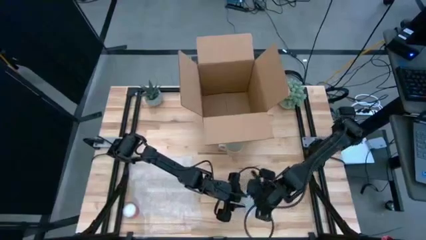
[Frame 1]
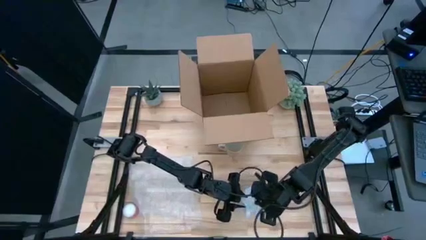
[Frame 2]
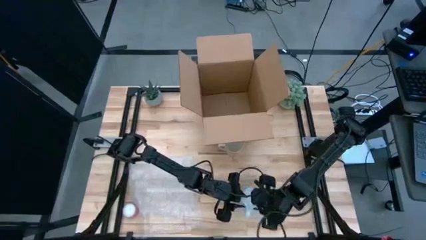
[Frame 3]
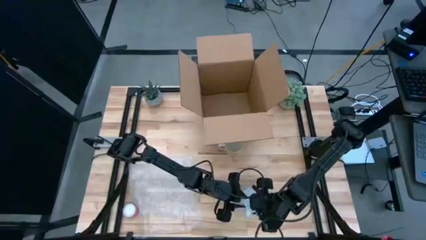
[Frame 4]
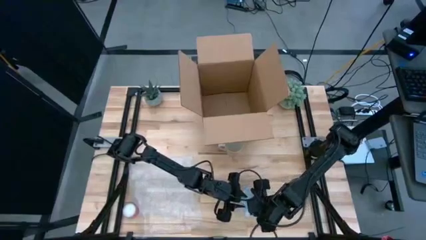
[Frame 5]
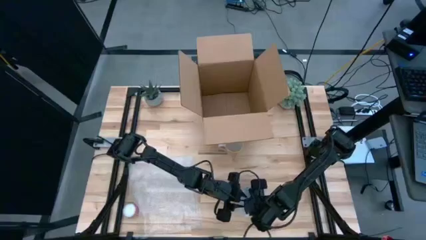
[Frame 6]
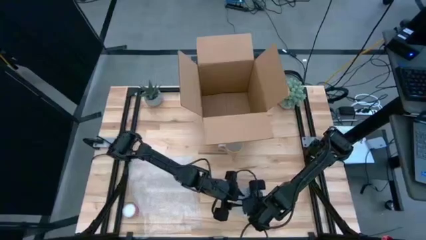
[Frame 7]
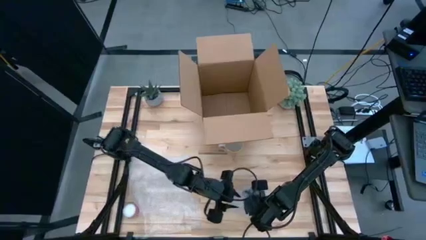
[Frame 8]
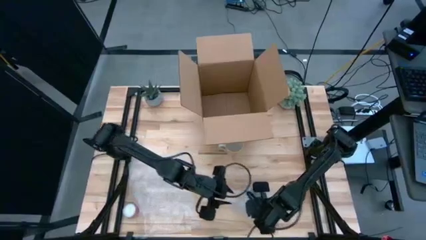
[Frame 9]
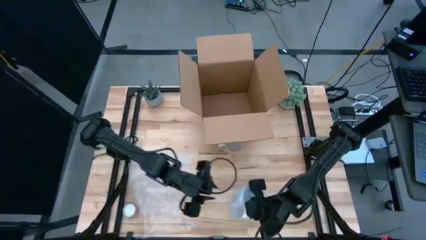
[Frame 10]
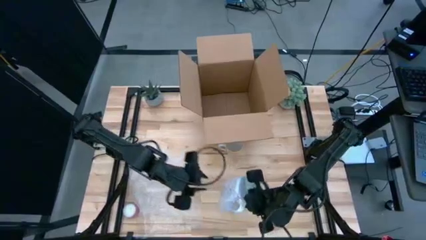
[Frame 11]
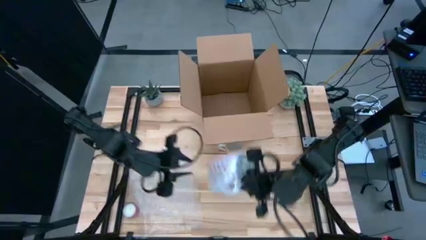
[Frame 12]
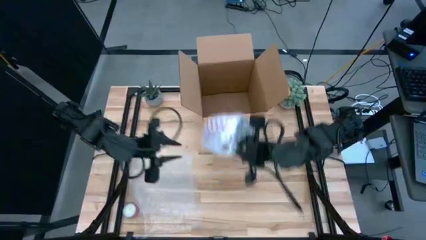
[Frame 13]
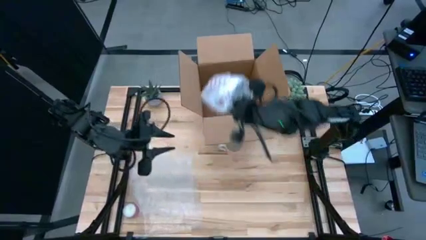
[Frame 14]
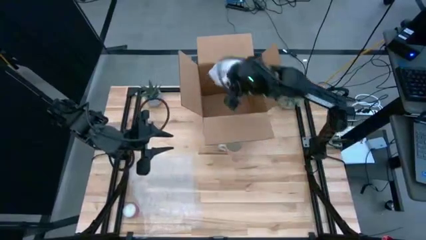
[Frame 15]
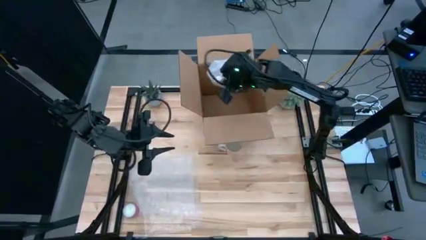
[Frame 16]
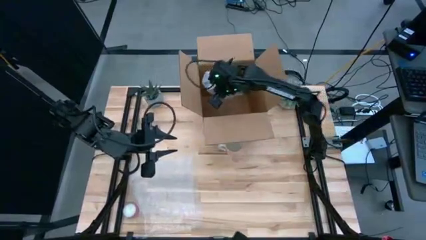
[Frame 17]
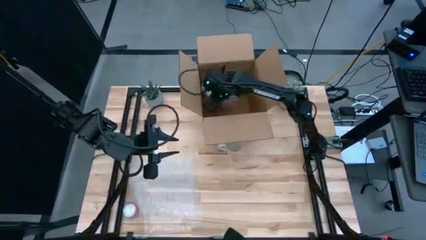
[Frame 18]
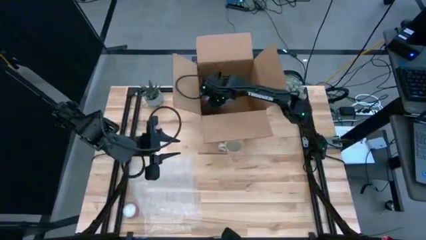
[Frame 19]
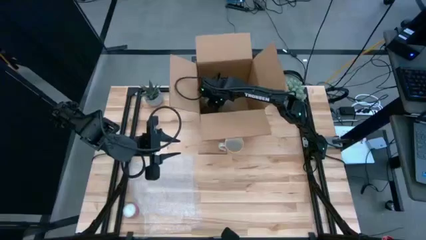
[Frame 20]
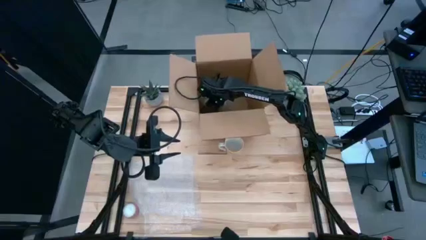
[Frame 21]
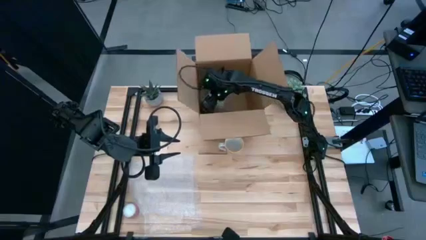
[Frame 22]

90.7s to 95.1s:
Task: wrap mug
Put the wrapped red mug into the cardboard box

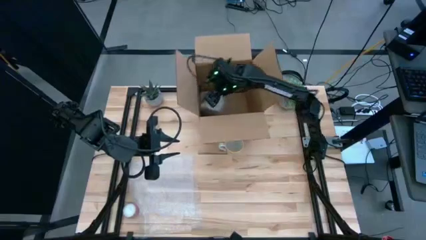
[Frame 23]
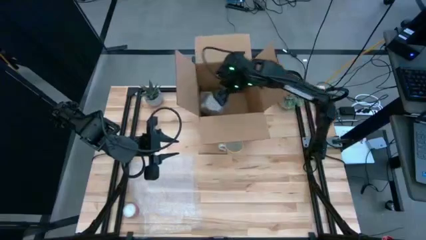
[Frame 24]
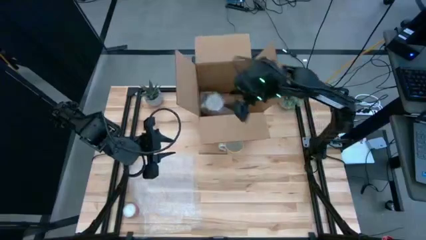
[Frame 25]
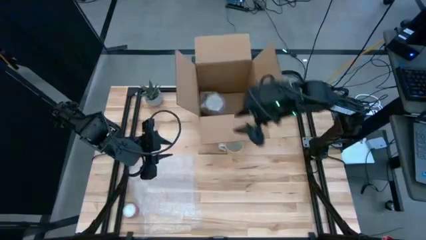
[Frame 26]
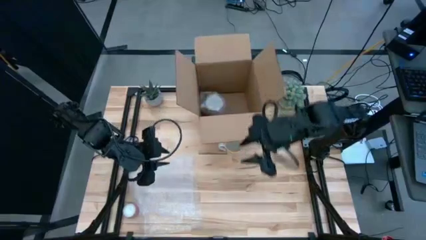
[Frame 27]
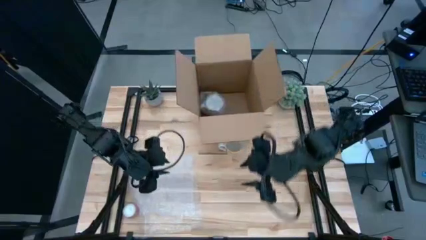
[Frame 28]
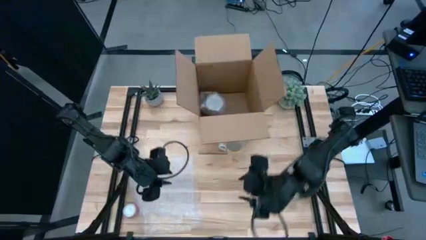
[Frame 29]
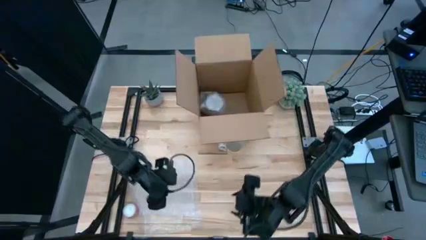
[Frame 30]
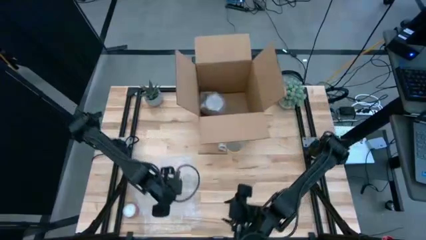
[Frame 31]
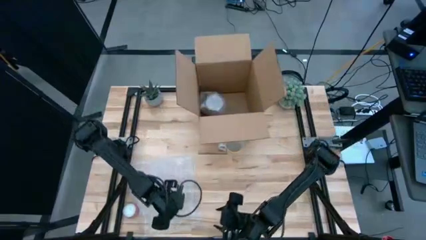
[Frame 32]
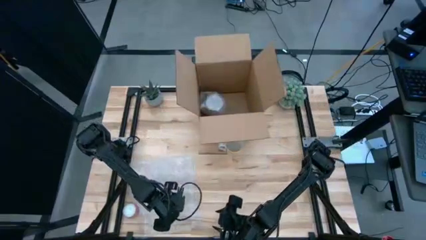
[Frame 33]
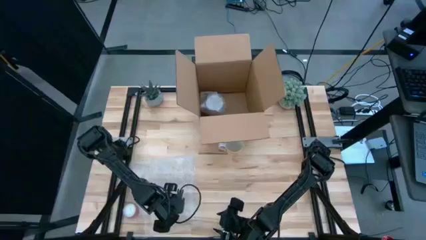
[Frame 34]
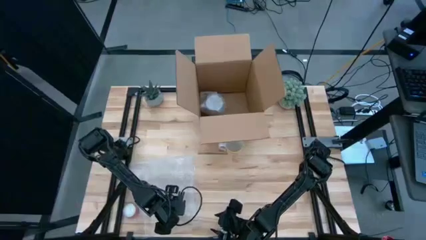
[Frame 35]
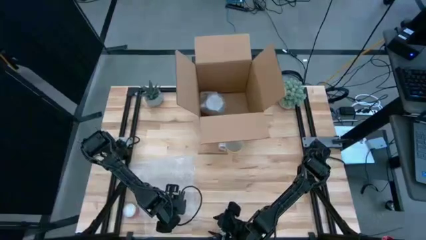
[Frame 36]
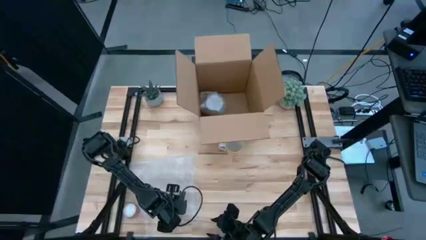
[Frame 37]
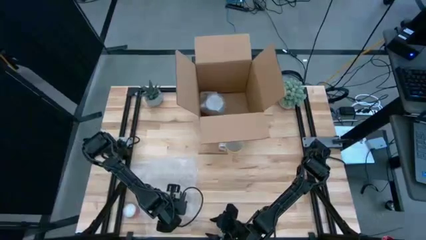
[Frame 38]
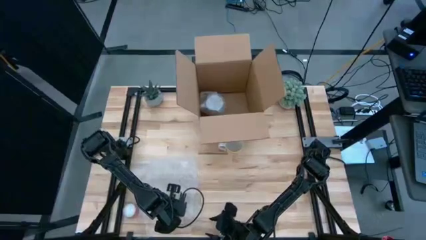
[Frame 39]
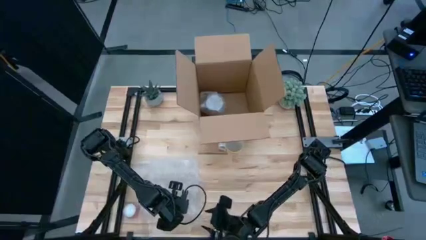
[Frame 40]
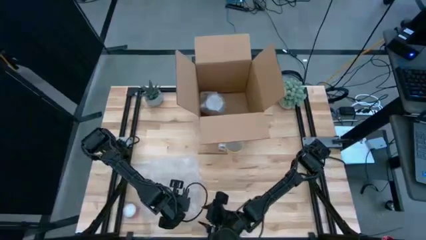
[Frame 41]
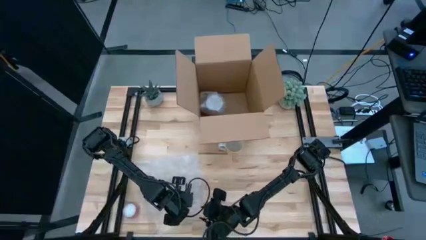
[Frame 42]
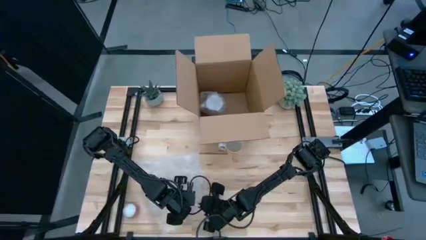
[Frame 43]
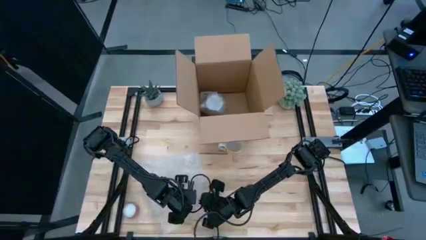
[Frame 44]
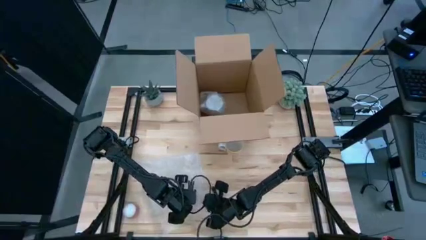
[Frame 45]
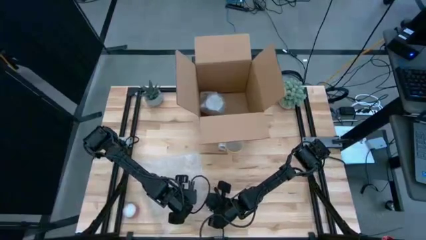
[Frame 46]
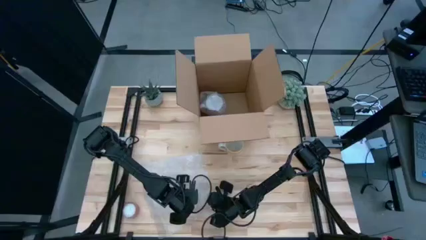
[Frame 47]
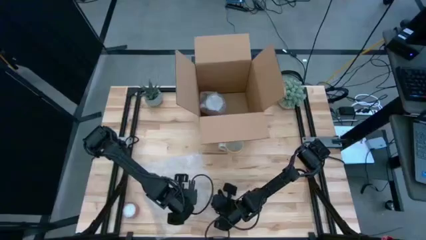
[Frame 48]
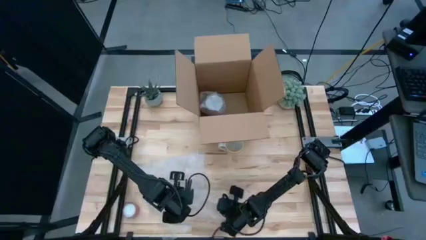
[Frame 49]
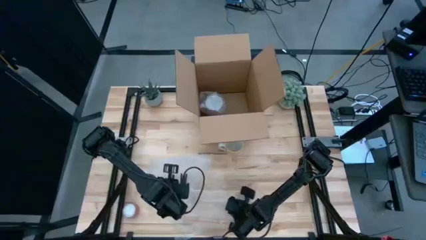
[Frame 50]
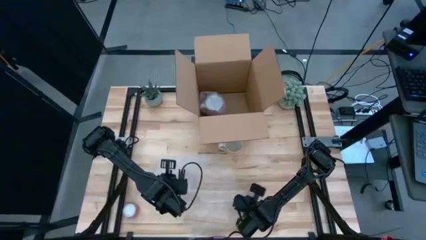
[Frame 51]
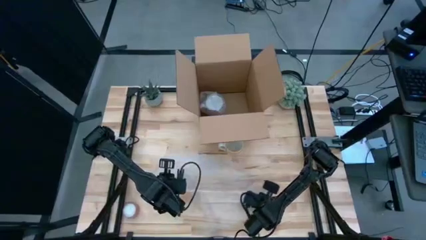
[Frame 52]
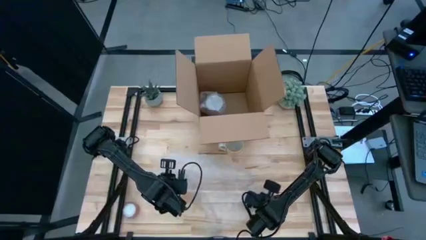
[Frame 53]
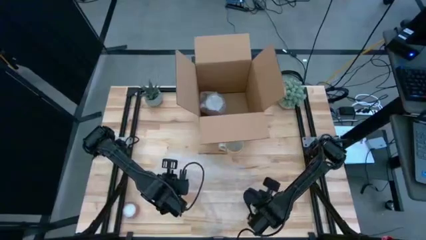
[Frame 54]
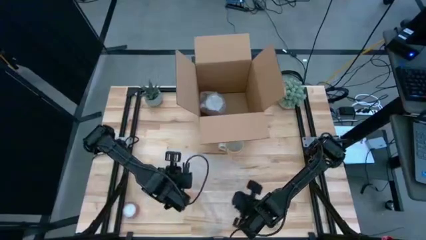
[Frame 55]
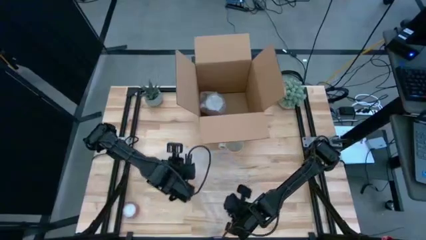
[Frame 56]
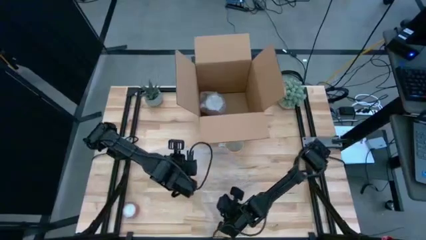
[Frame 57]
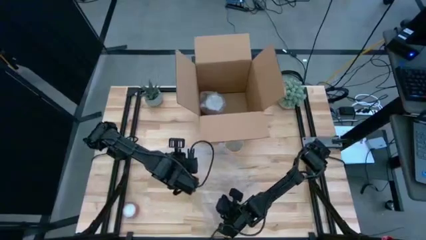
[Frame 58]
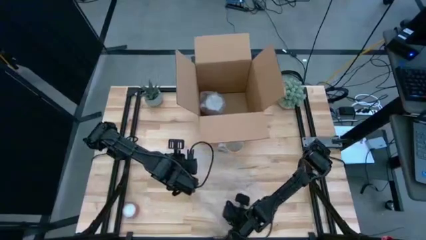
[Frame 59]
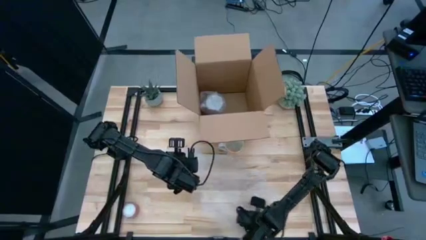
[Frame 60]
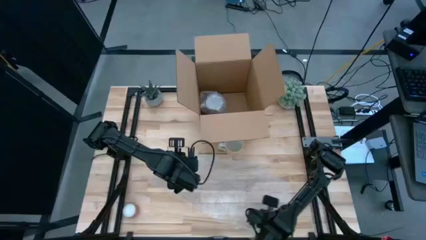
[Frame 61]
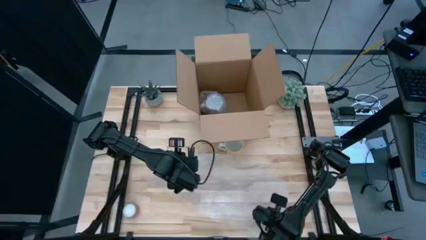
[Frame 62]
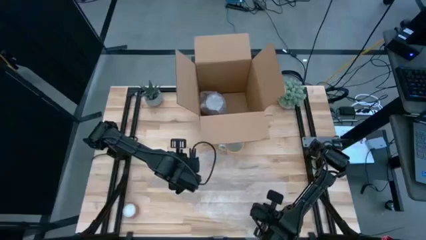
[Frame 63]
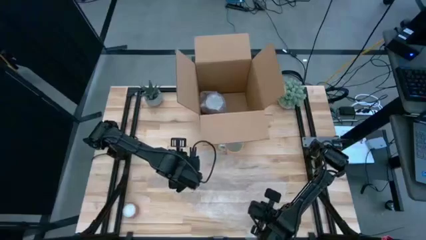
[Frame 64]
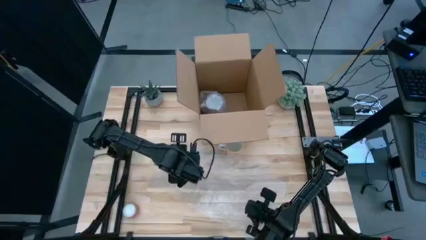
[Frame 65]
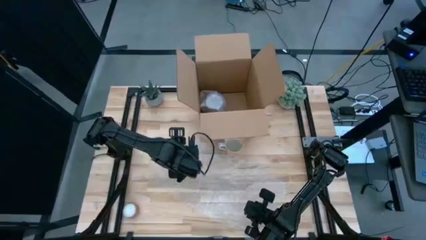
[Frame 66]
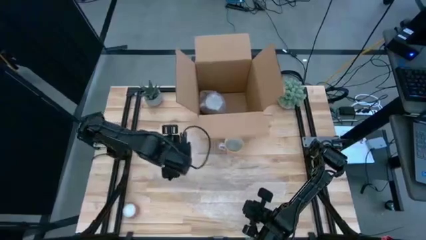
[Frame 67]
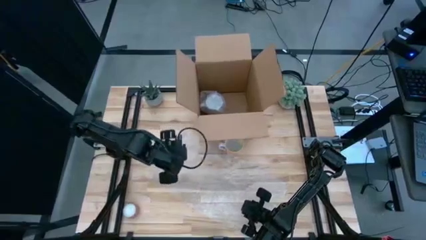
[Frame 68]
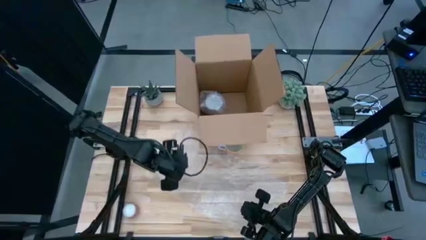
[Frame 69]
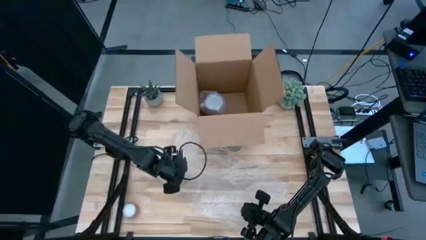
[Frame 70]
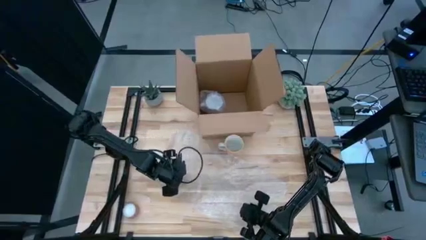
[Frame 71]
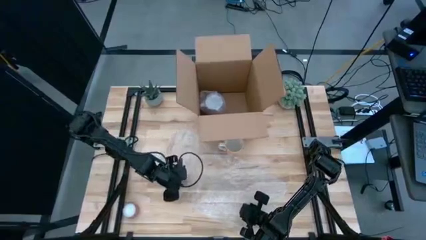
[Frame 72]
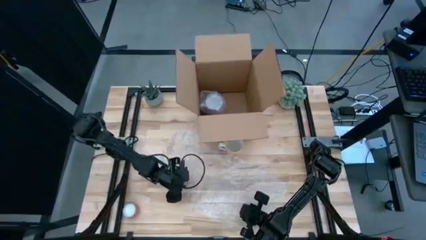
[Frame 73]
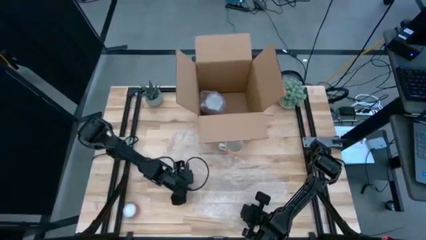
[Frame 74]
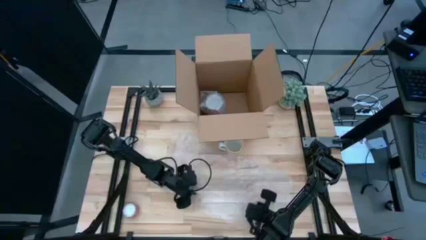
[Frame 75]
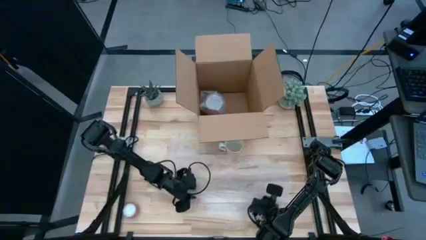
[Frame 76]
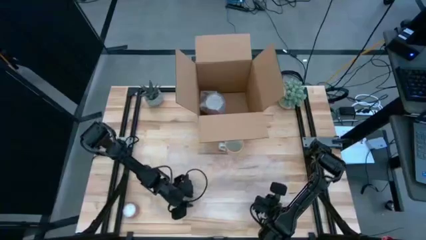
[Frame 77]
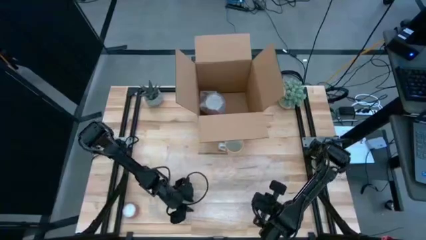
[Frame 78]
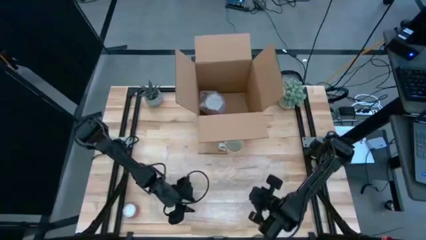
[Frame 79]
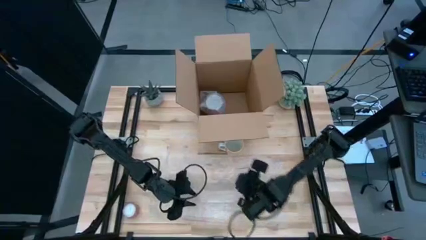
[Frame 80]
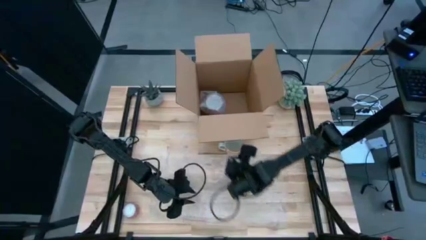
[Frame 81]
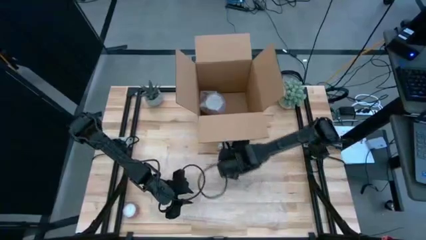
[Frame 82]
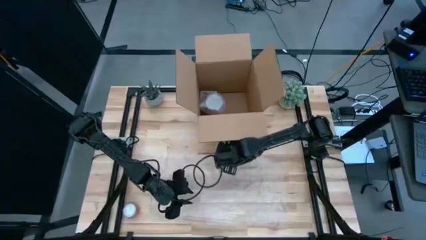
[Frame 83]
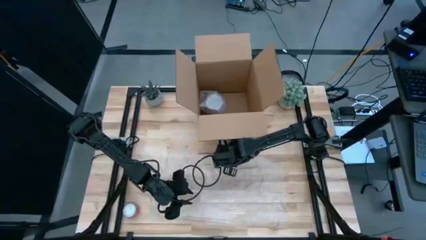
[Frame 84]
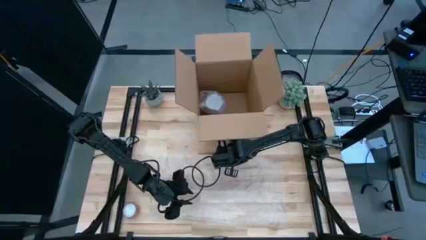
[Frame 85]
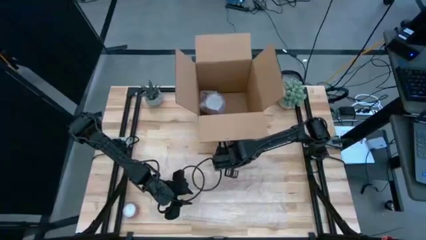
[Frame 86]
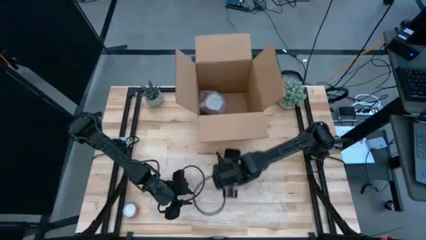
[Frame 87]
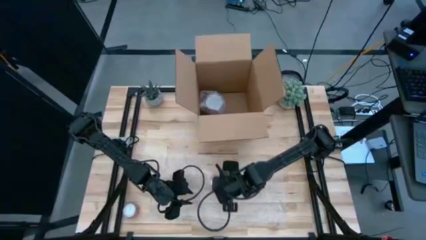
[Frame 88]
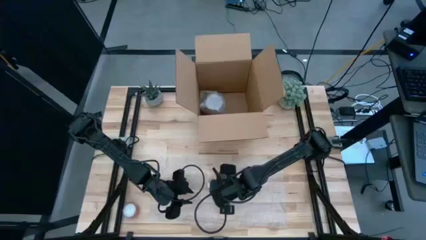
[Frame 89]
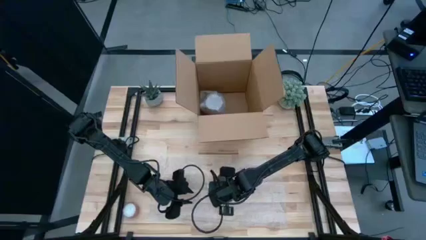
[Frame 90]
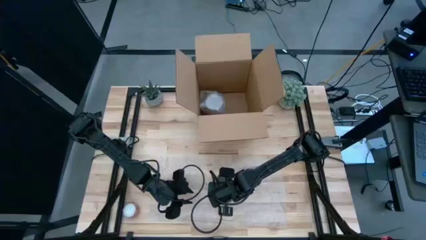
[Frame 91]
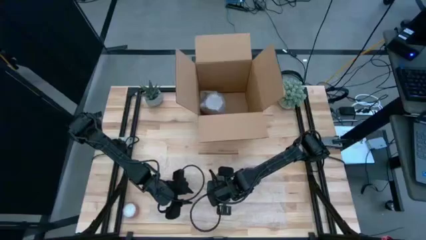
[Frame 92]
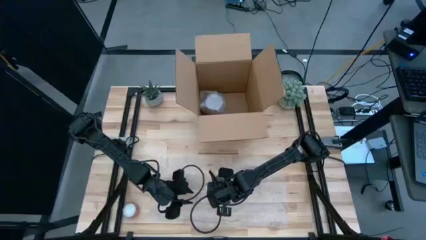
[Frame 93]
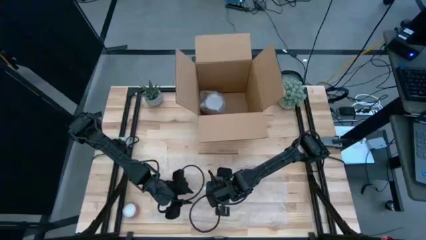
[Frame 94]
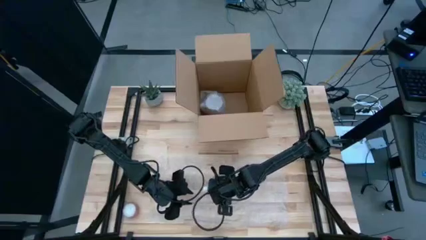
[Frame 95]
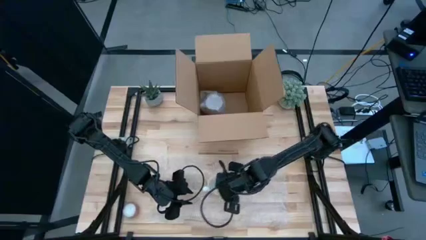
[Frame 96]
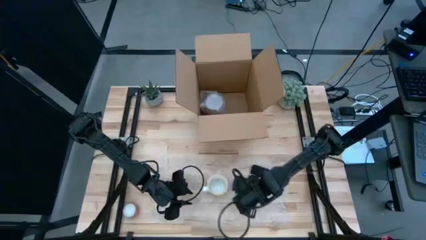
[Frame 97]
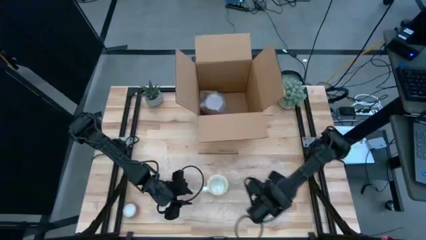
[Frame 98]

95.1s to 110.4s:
Wrap the orange mug with the transparent bubble wrap
